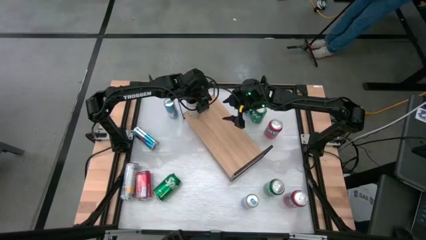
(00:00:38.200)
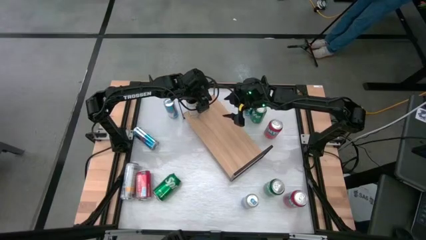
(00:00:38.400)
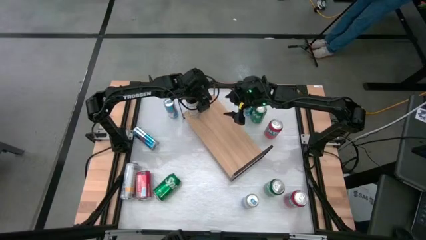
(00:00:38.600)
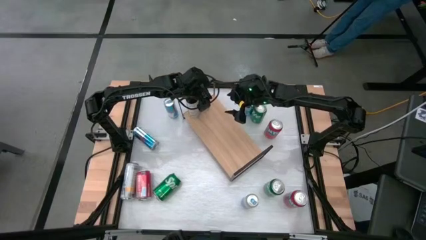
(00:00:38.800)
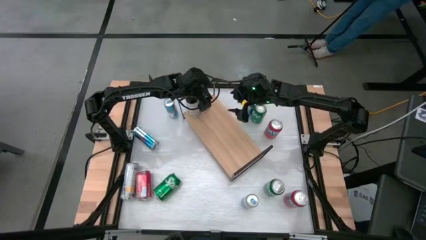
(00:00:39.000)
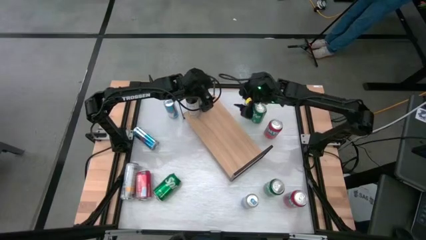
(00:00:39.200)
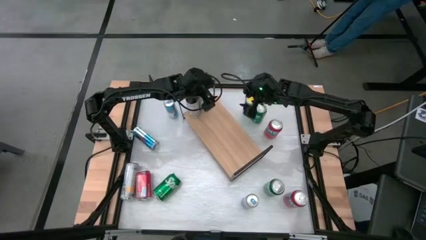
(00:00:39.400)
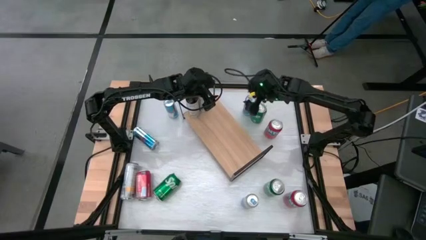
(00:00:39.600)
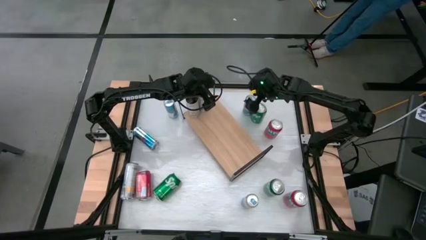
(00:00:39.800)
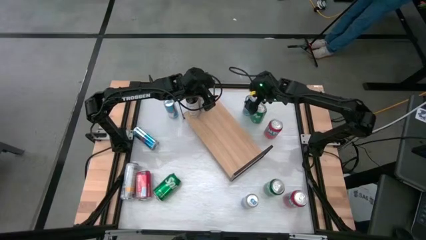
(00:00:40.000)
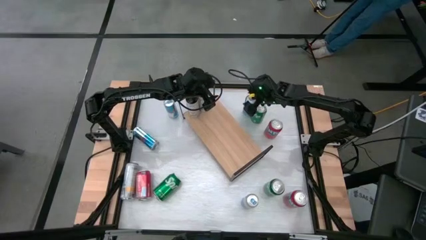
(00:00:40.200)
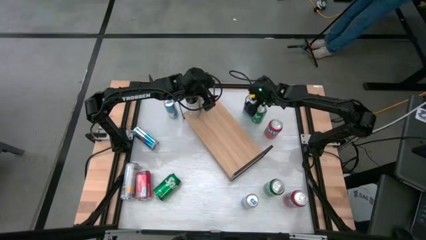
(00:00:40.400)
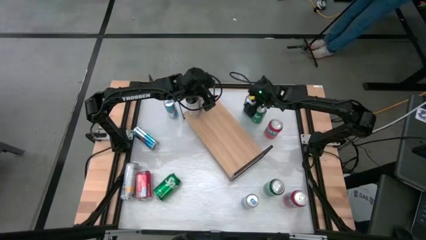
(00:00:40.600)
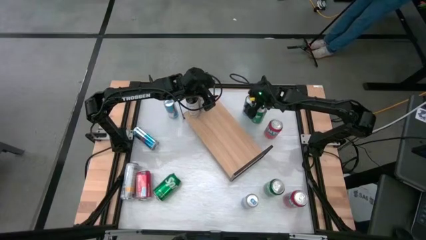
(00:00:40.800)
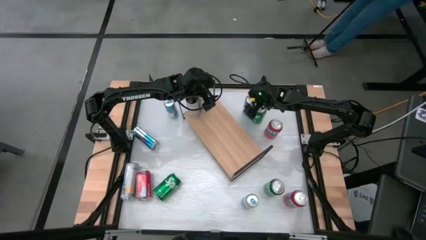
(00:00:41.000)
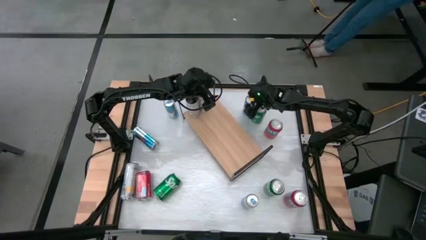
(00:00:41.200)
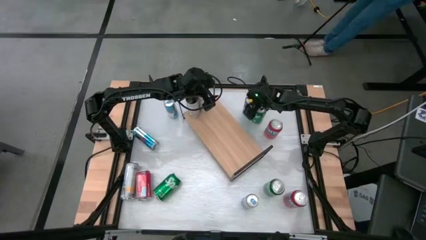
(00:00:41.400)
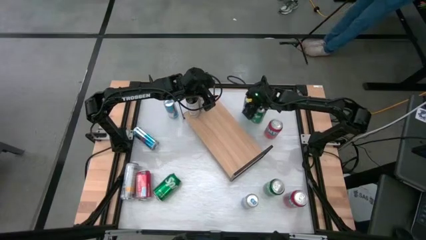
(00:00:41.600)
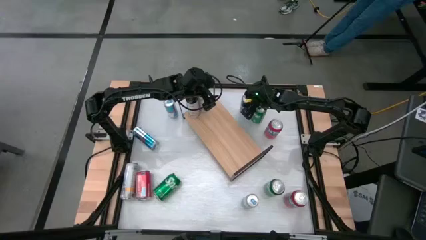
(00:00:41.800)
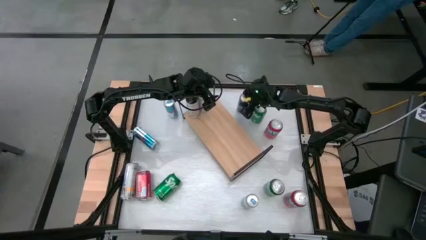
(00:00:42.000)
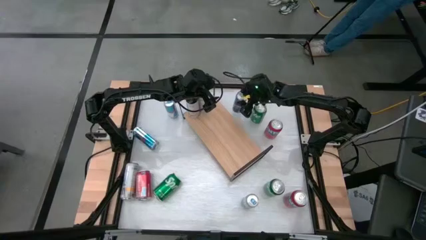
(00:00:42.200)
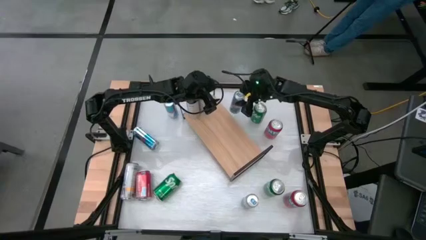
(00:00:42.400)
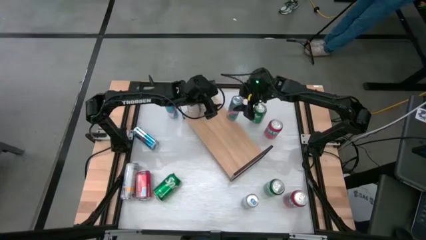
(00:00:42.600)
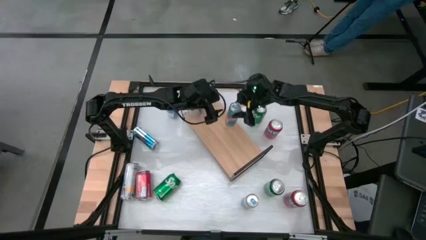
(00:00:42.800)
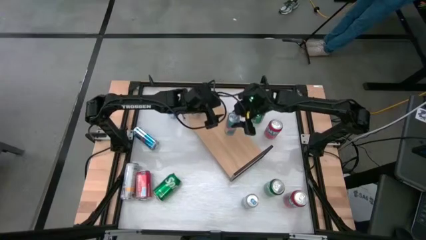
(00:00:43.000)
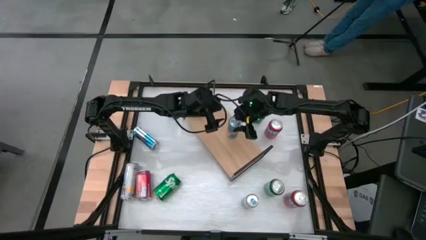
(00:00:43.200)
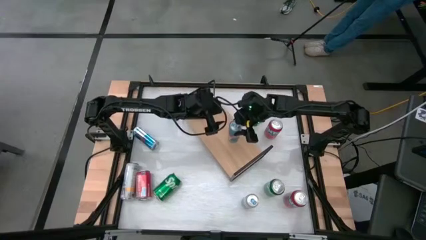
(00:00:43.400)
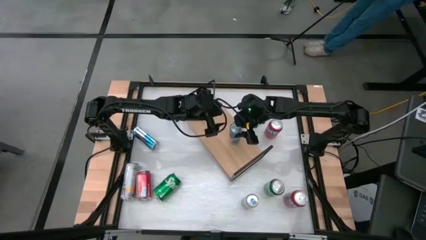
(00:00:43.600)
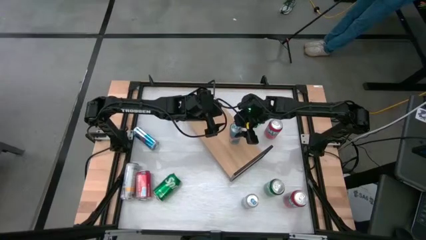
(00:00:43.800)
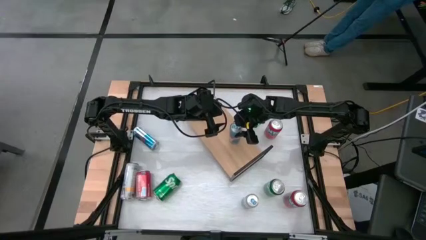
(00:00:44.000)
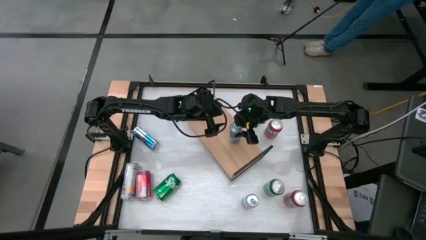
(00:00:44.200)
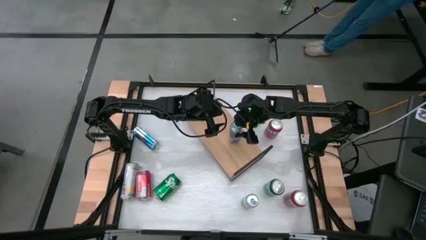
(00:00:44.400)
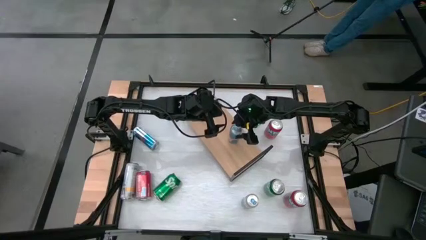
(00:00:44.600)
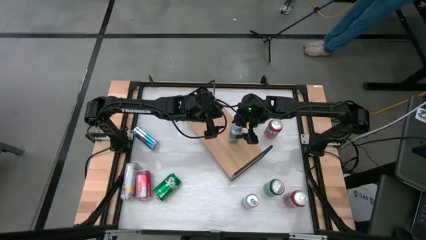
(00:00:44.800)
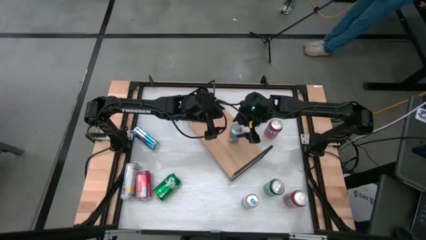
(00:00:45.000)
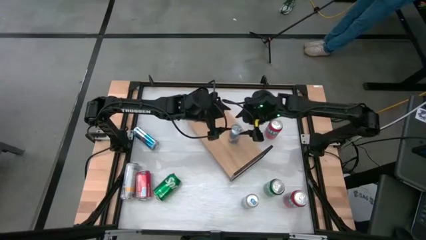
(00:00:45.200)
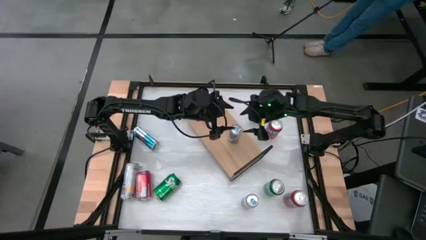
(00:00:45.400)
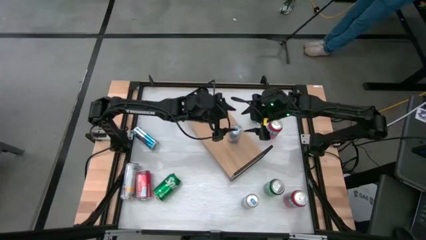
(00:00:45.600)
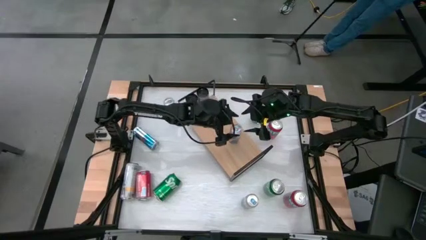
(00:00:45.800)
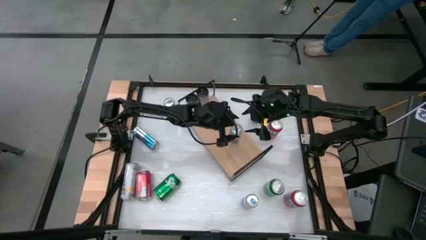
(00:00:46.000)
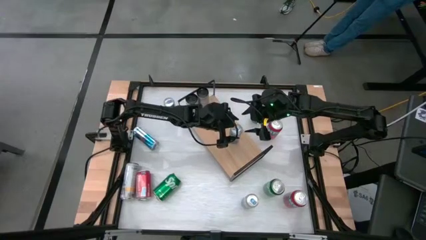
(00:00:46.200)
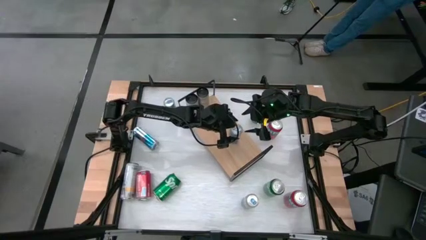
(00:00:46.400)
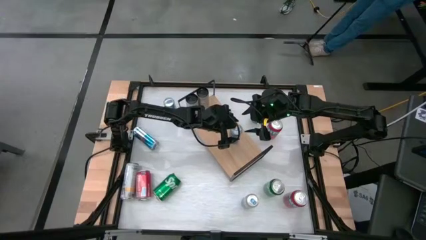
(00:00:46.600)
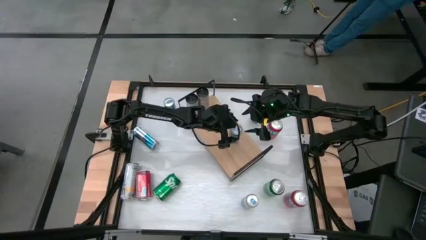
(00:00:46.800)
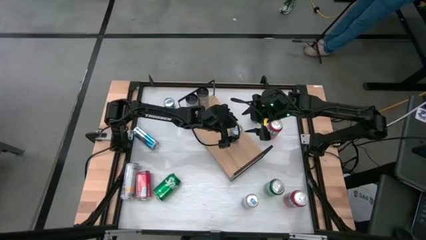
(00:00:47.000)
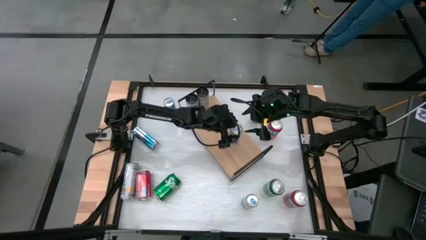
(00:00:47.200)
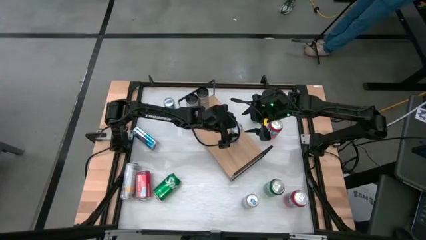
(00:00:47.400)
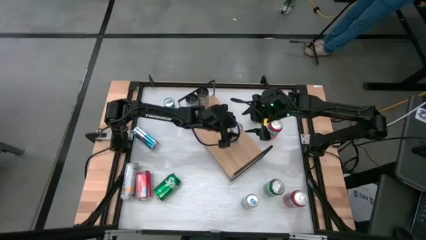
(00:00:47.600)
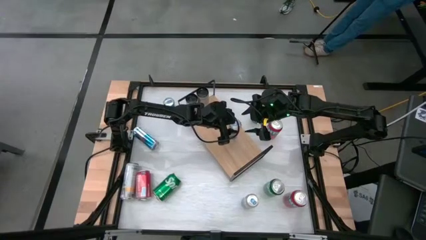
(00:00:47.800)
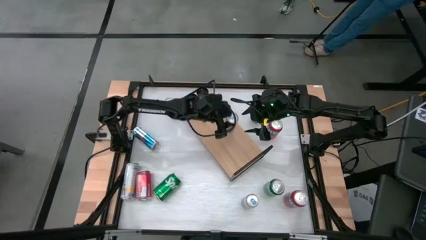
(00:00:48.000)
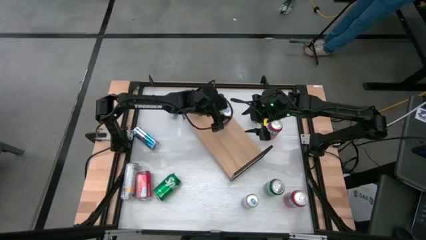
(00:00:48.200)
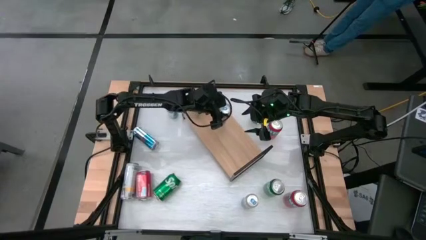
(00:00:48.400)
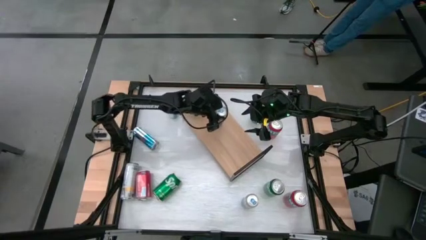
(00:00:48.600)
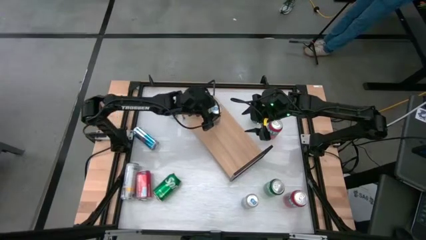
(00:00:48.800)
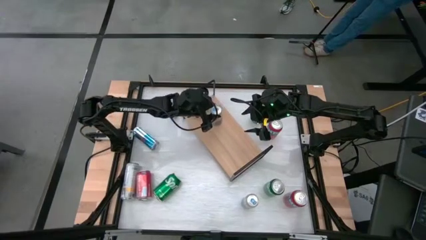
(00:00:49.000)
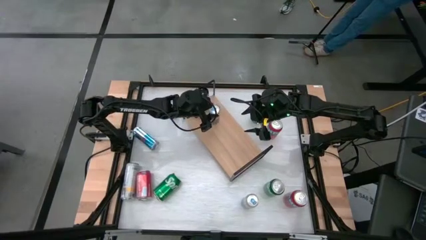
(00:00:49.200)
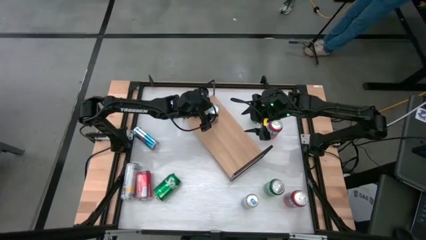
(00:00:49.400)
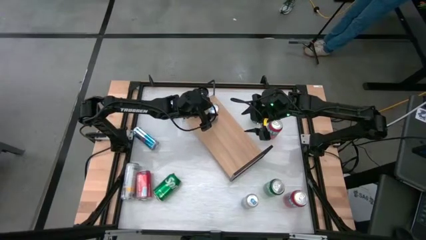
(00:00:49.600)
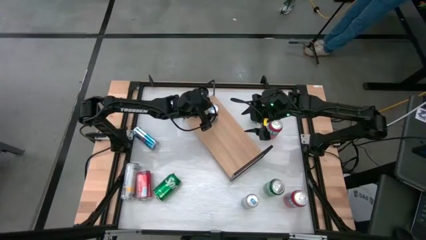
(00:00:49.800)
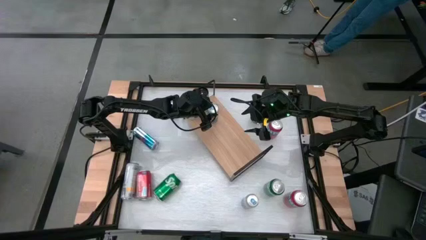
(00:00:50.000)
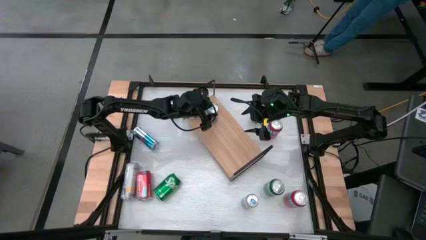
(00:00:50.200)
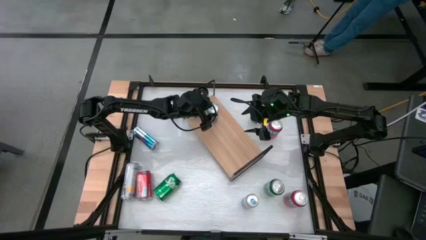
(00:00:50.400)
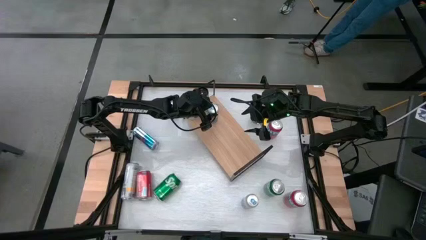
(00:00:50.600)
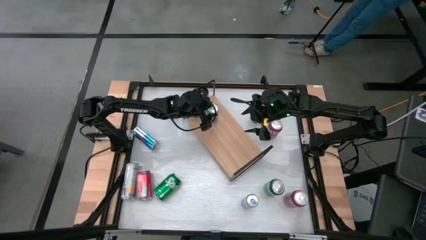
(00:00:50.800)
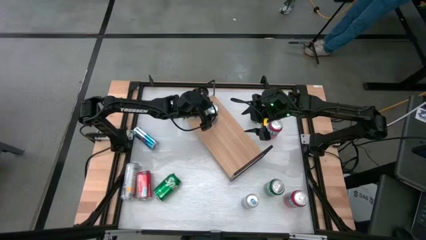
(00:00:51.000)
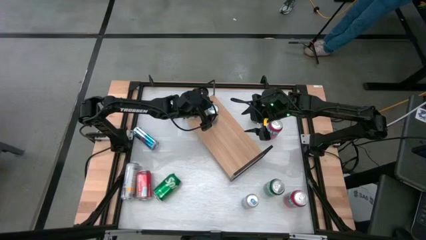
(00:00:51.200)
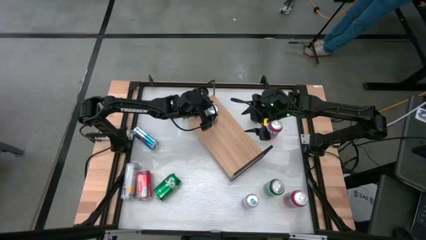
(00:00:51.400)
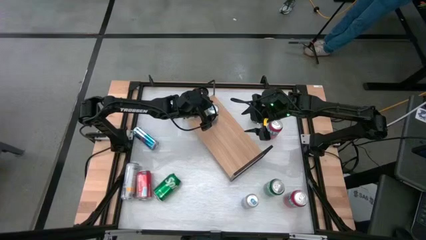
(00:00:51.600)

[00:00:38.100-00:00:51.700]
Task: Place canned beverage on shelf
Put the top right blue soda can on the shelf
